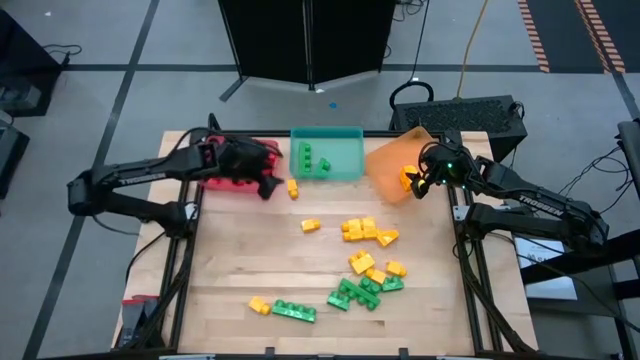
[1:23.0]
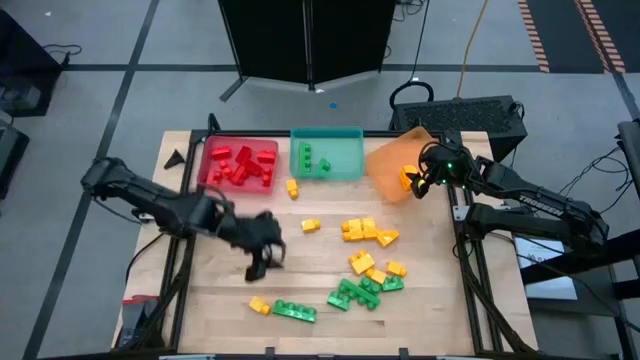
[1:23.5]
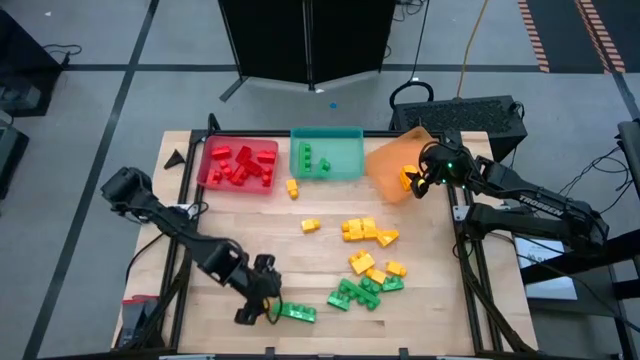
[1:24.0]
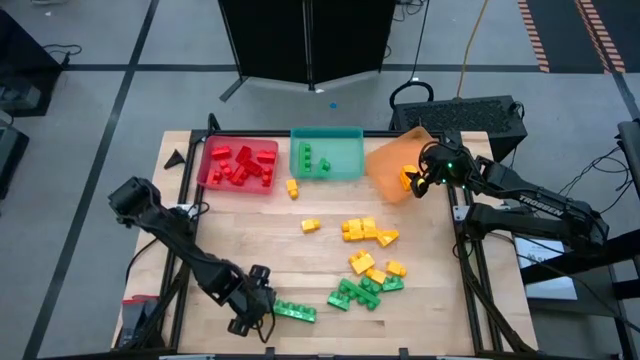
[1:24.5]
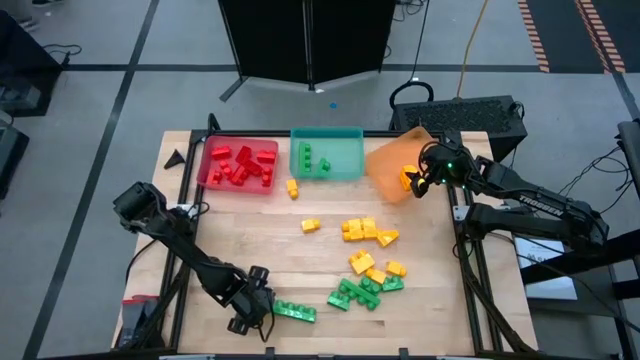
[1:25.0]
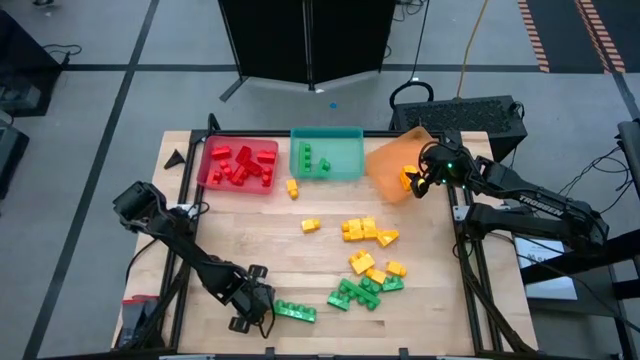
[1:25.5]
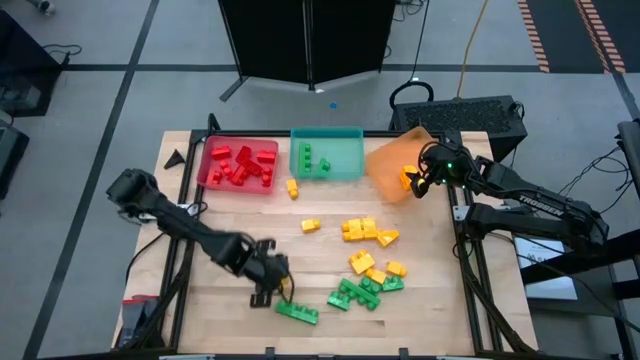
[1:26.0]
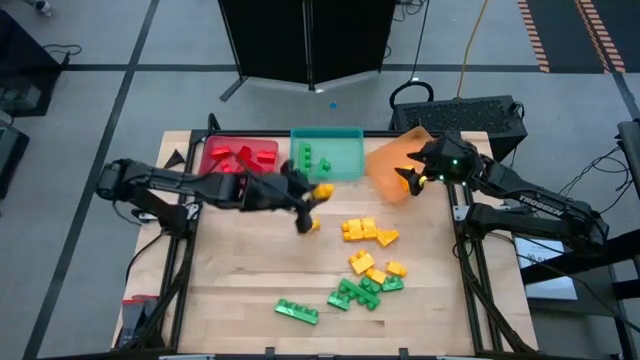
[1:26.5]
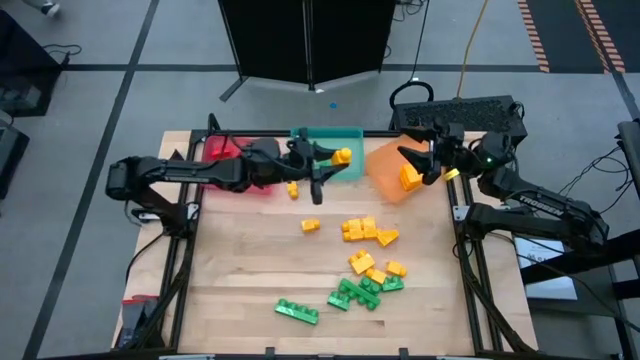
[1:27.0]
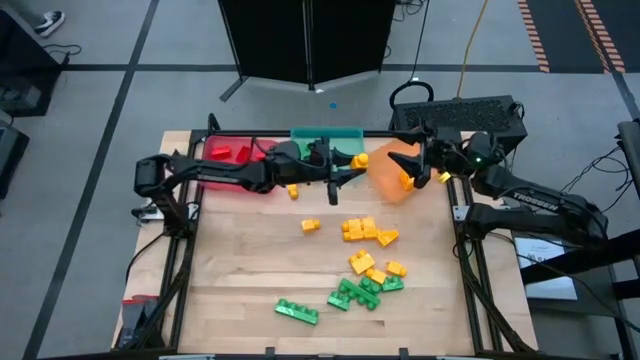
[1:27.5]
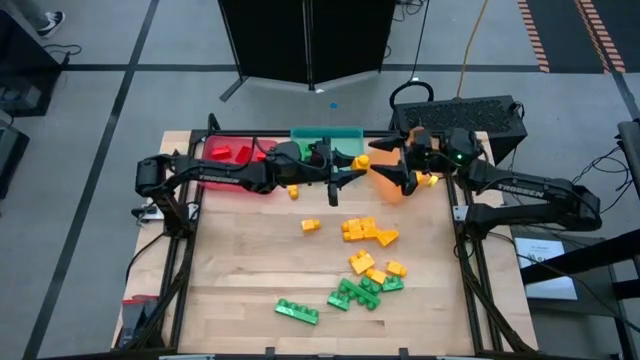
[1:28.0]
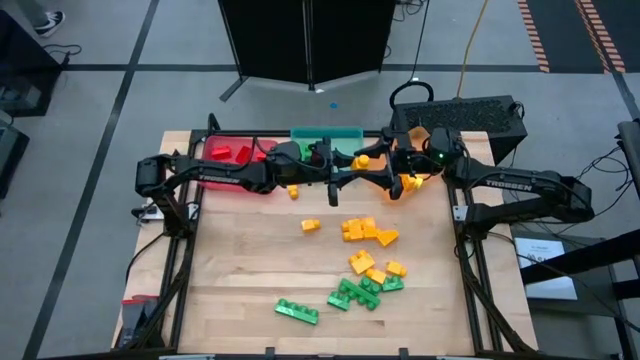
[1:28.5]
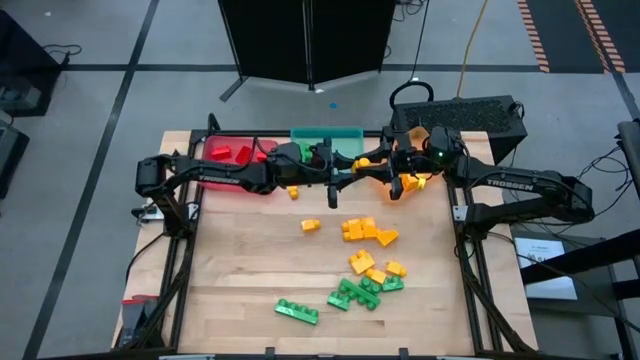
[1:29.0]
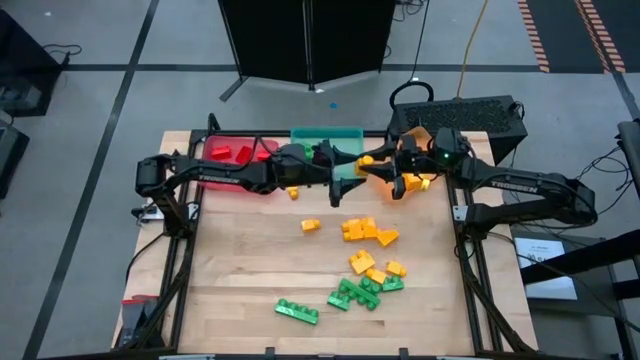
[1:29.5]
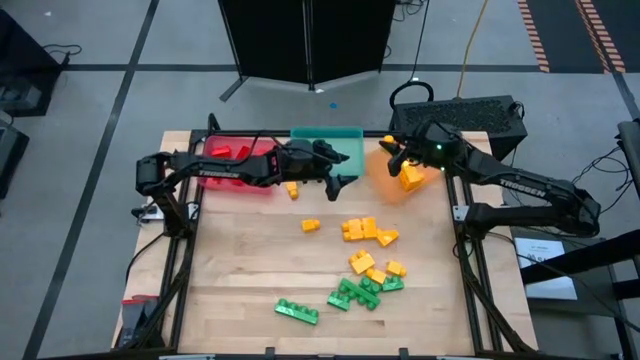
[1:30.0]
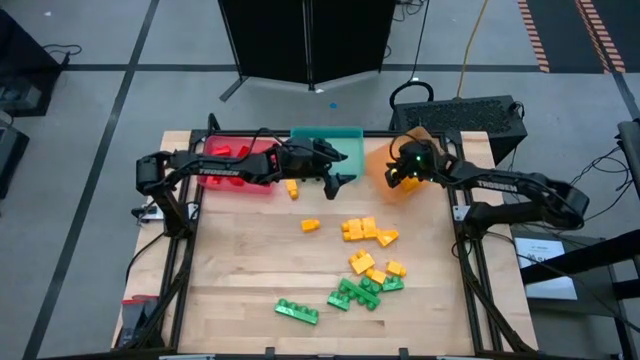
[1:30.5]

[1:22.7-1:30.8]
Task: Sort blocks
Put the yellow game piece into the orange bin

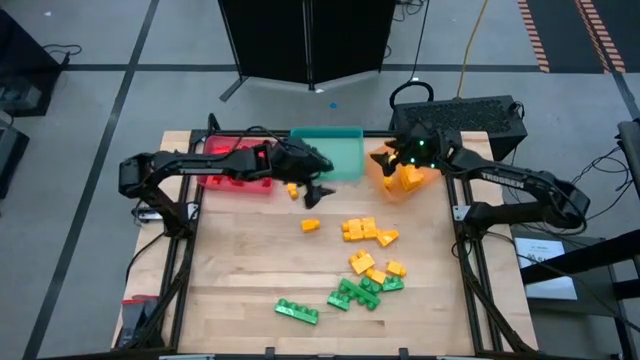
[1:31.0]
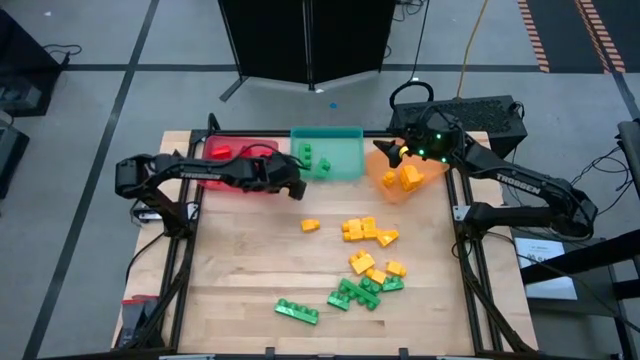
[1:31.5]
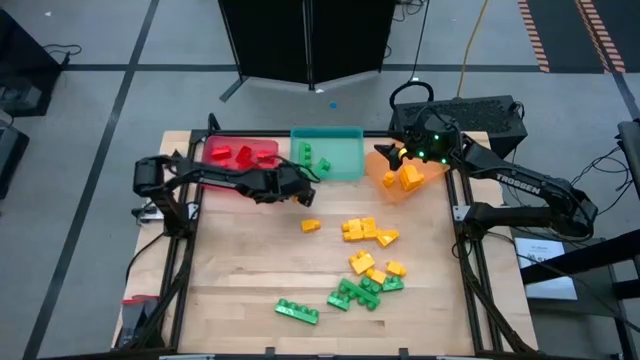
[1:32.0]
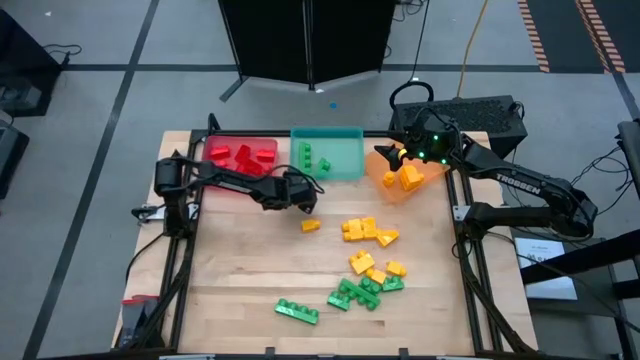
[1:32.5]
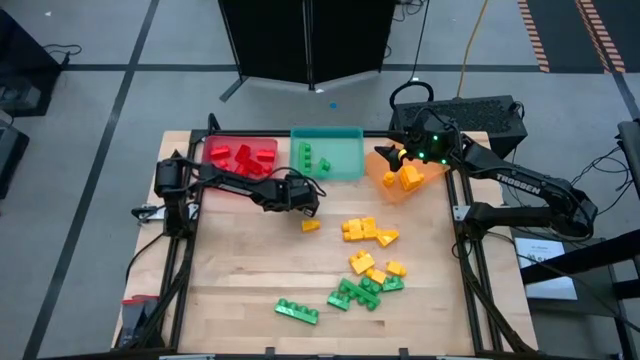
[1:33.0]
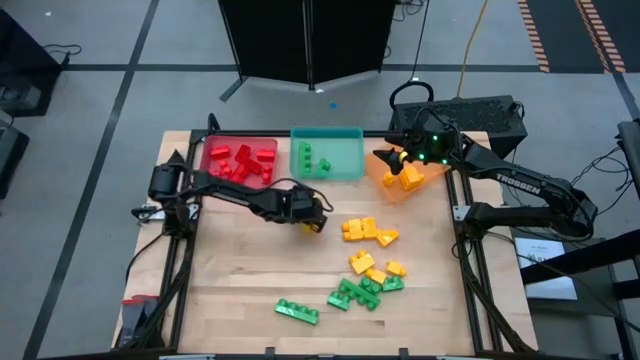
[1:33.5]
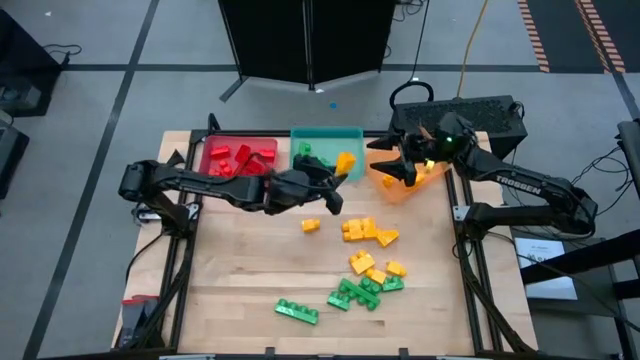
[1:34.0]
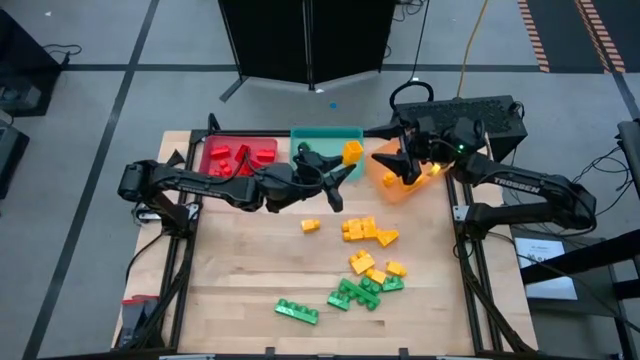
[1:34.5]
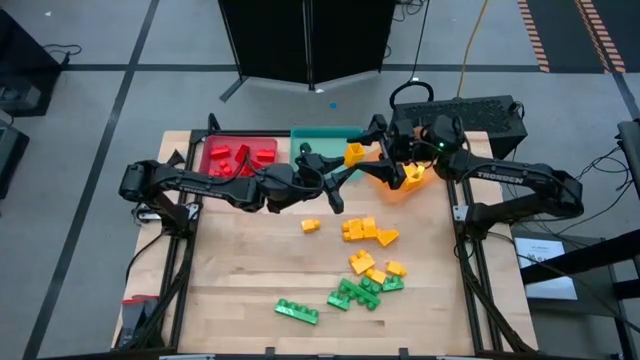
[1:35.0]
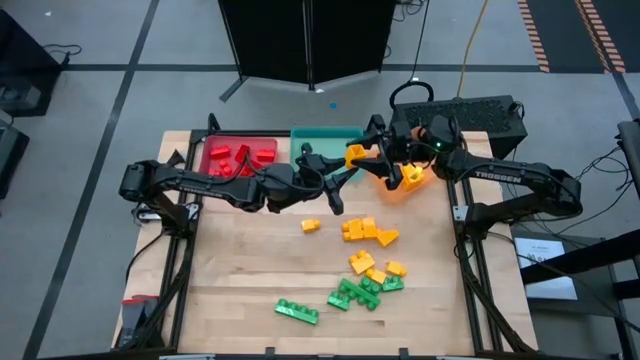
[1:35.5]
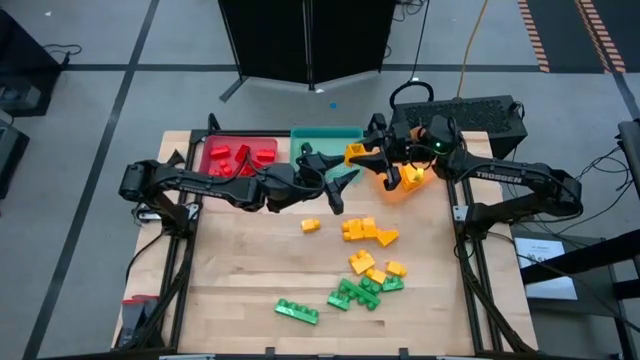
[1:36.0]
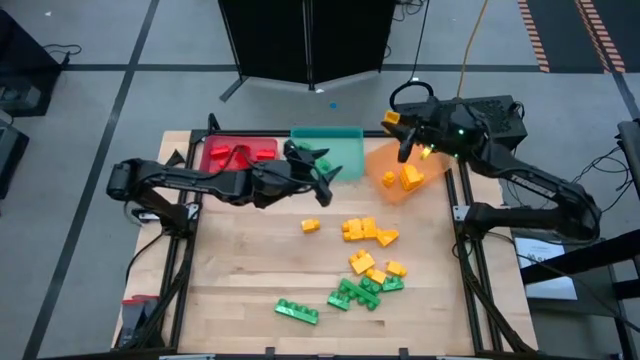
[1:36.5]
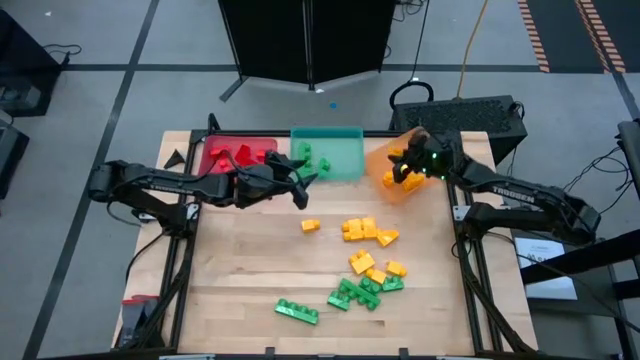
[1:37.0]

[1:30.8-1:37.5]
Put the yellow game piece into the orange bin

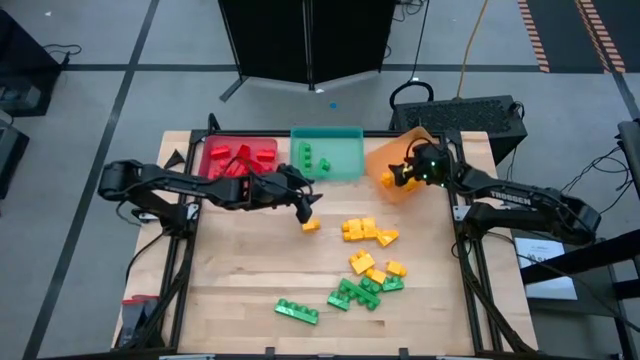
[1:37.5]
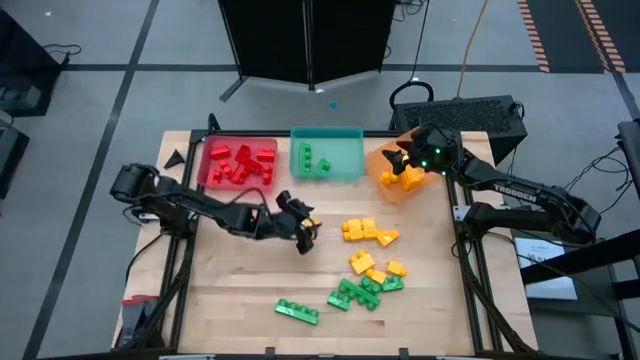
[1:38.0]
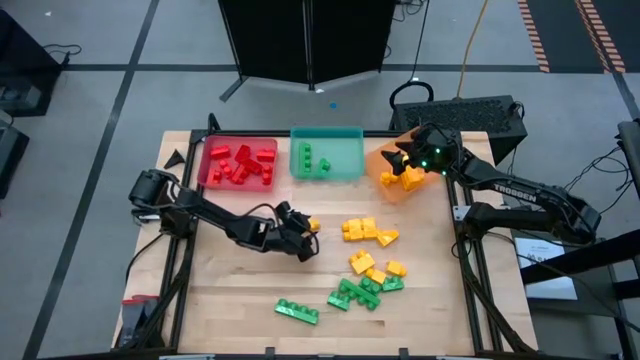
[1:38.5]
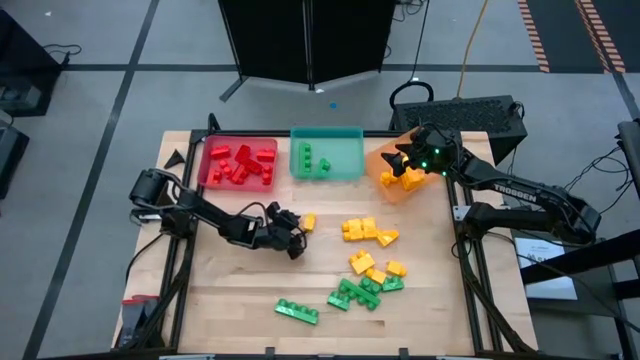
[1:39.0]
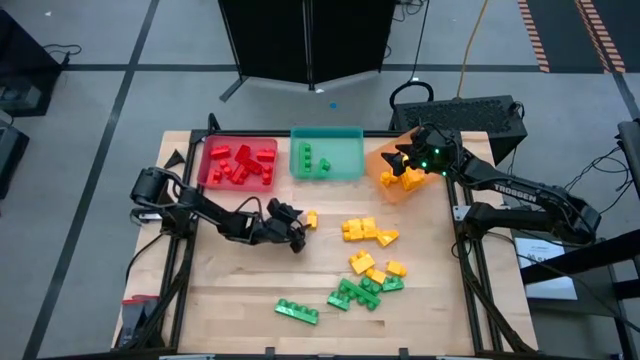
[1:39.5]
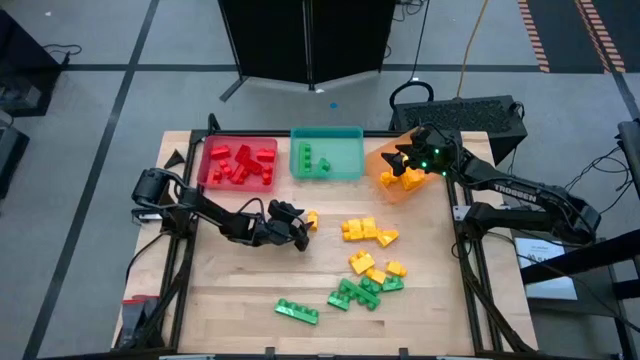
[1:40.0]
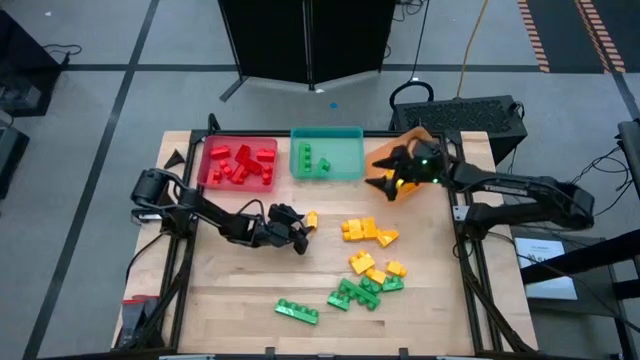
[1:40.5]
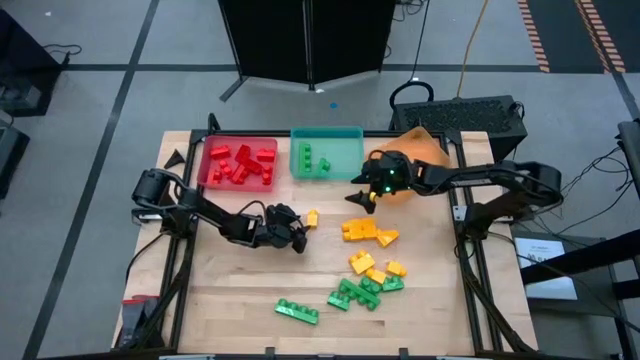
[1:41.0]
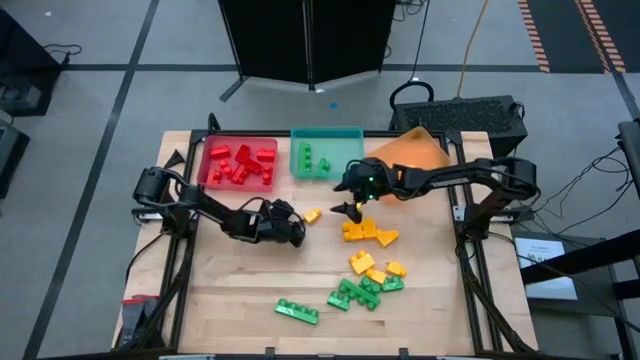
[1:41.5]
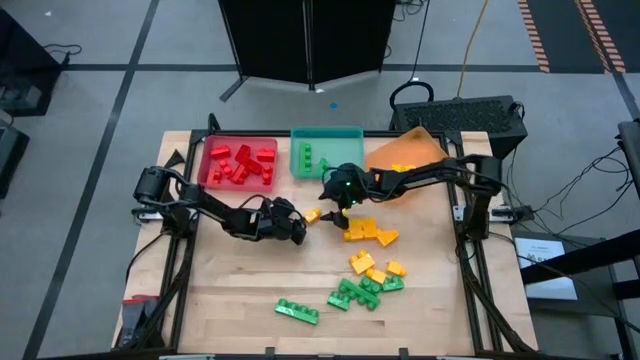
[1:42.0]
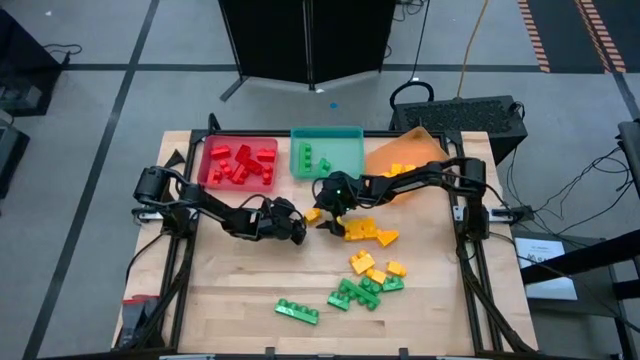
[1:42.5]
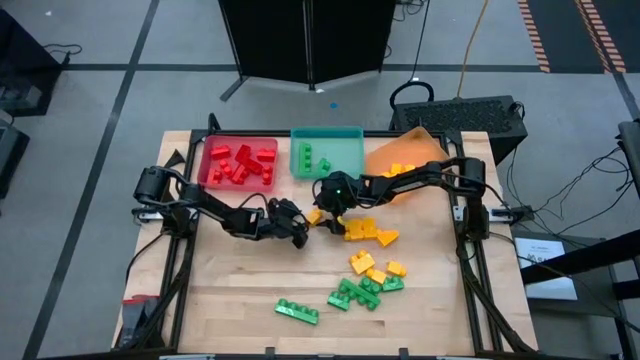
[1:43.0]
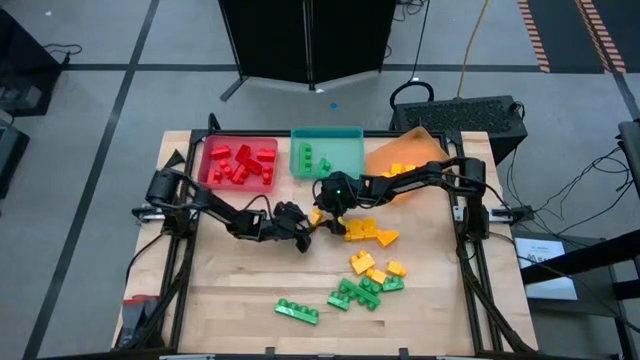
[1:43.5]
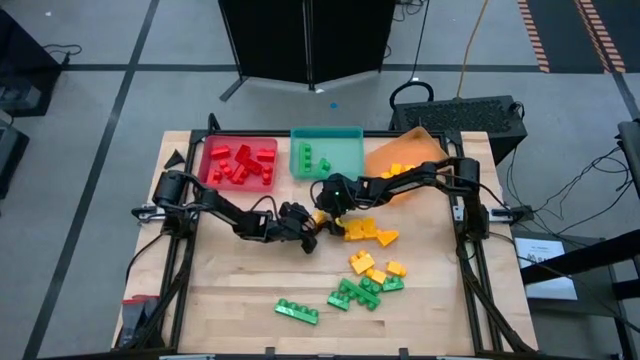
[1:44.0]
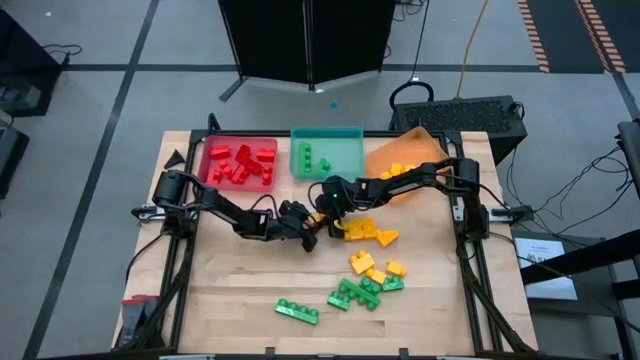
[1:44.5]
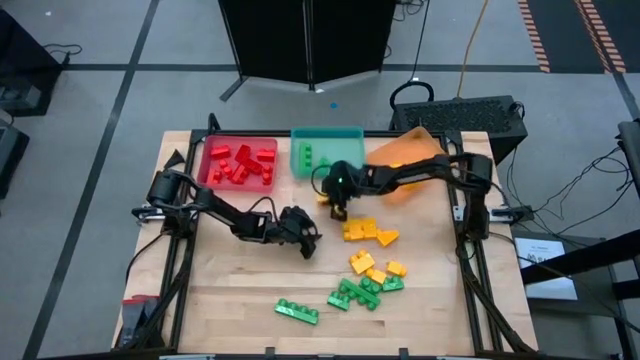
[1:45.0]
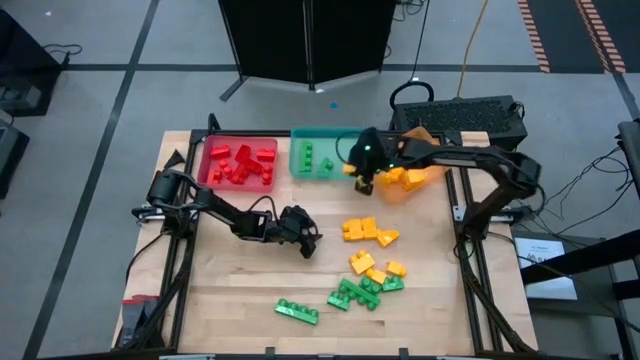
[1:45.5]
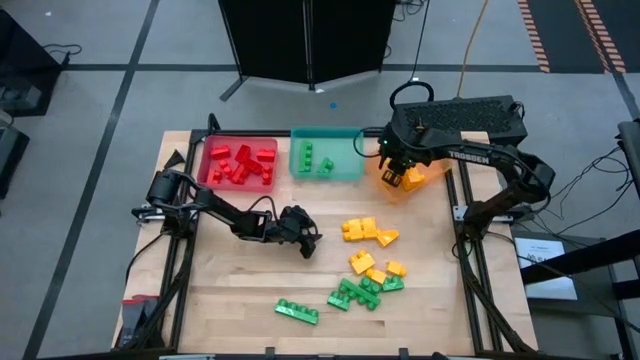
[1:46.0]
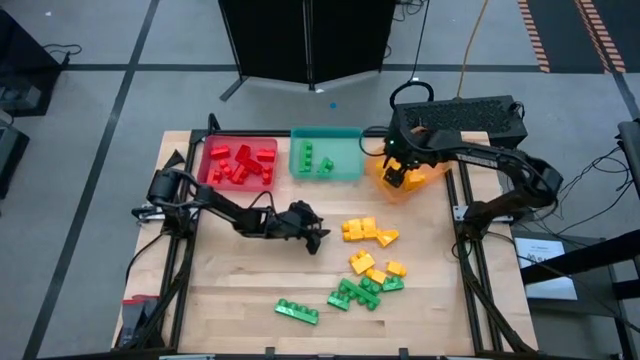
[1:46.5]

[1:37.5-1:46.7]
Put the yellow game piece into the orange bin
